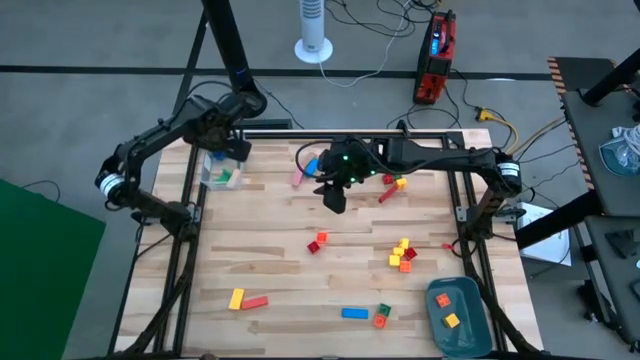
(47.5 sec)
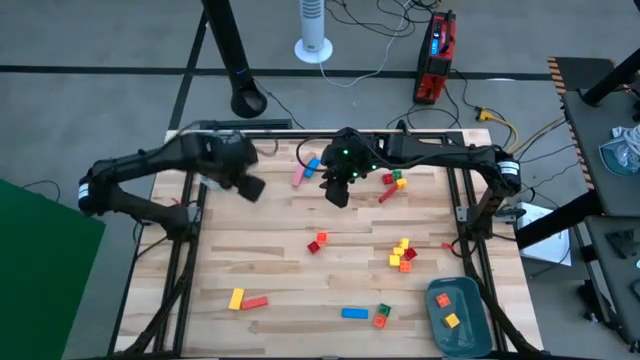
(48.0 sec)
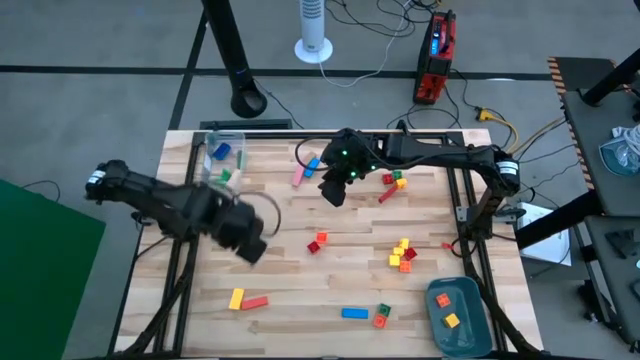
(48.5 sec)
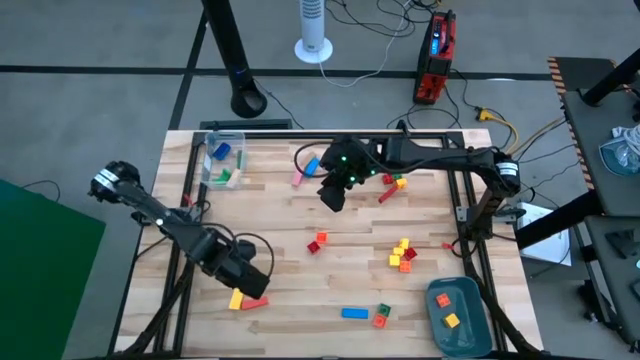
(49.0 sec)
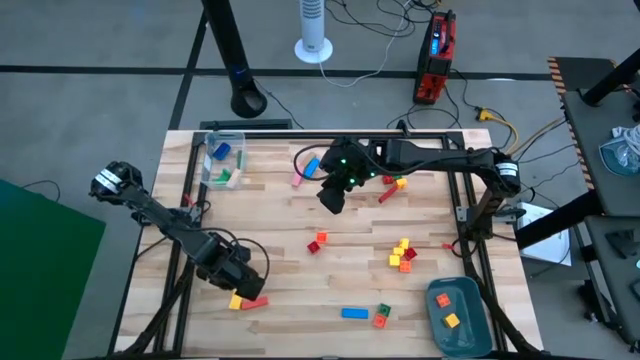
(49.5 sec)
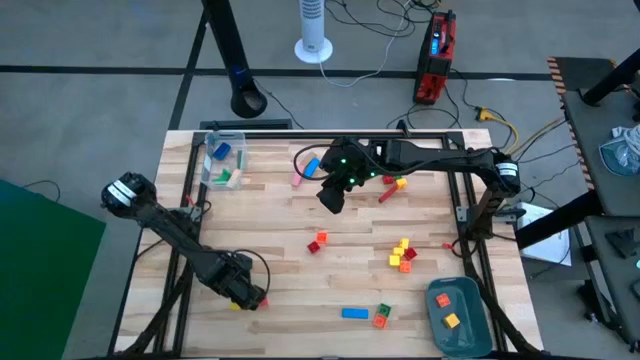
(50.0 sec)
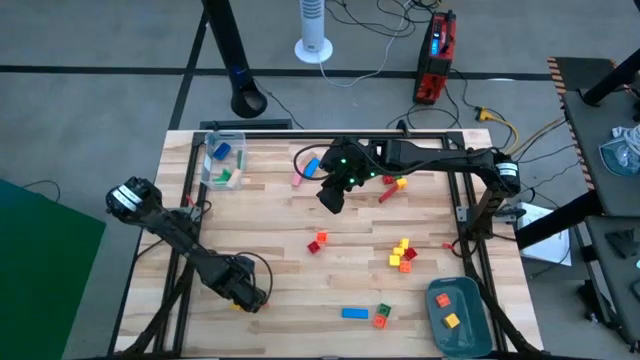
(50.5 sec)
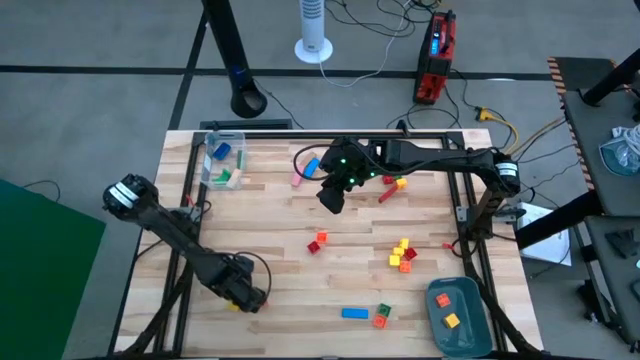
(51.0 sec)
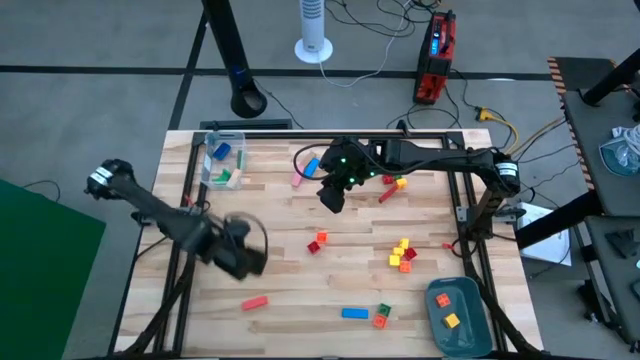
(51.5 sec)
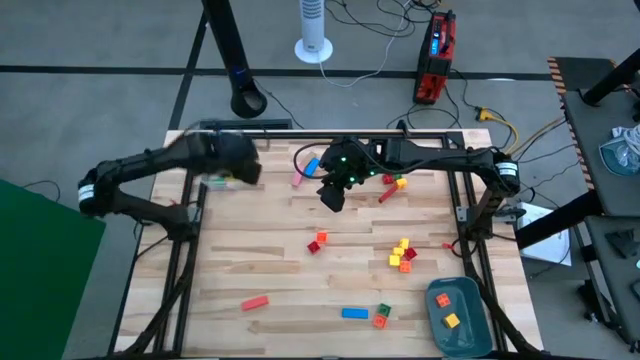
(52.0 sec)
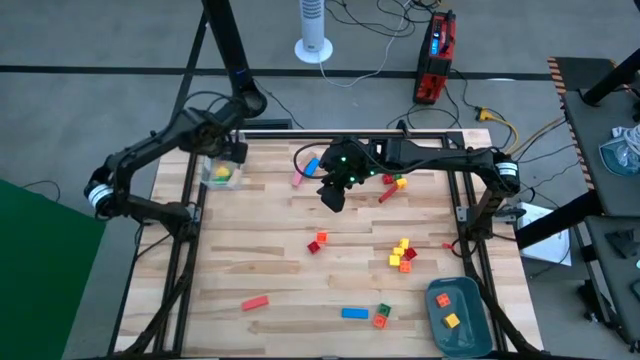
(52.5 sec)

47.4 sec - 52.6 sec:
Task: Sort blocks by size
Put the yellow rectangular wooden block into the transparent bin

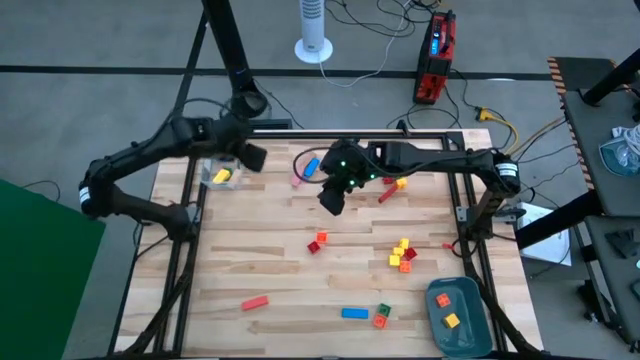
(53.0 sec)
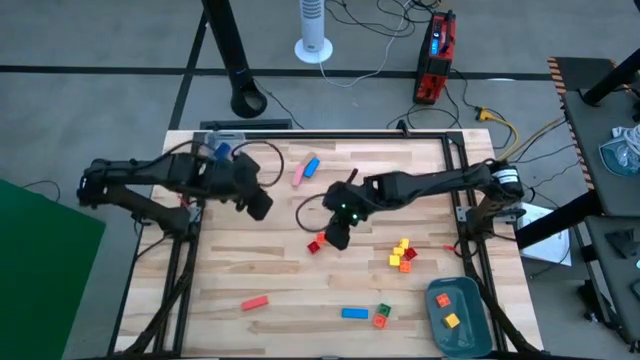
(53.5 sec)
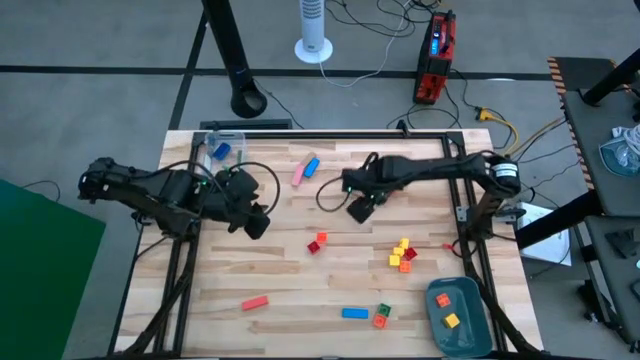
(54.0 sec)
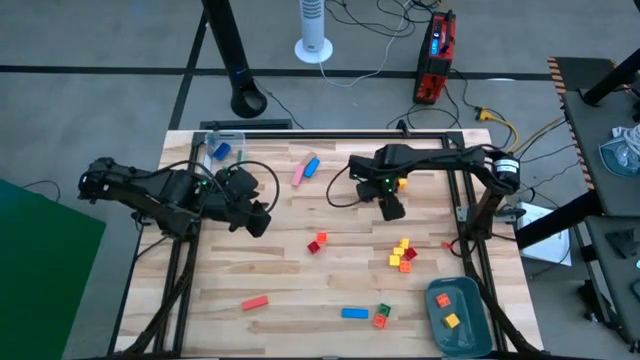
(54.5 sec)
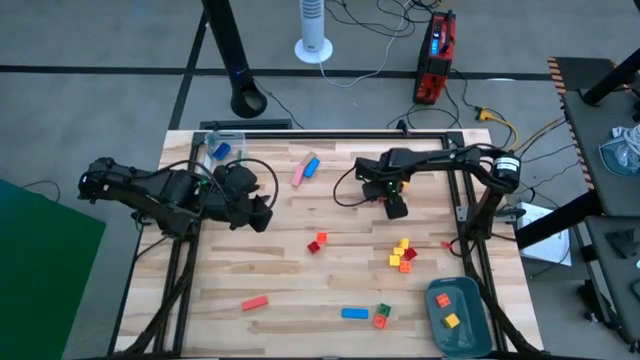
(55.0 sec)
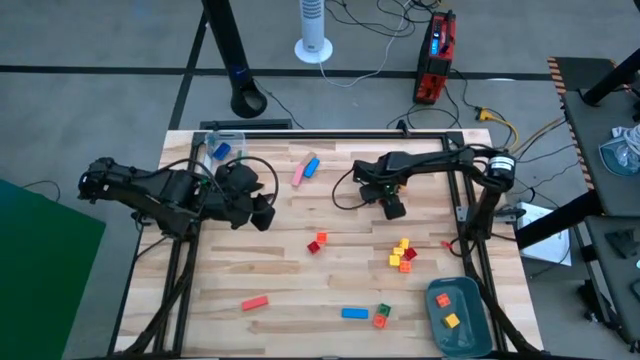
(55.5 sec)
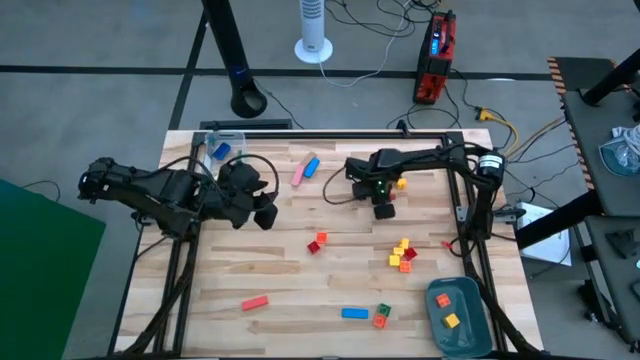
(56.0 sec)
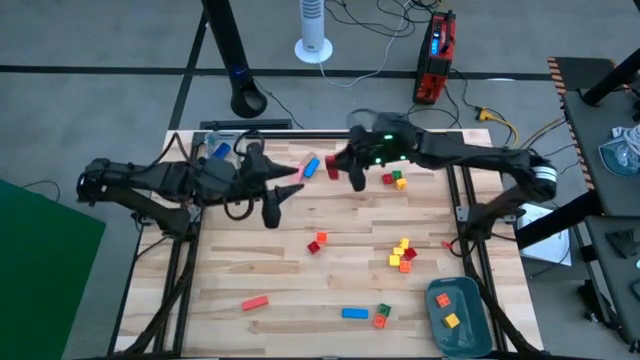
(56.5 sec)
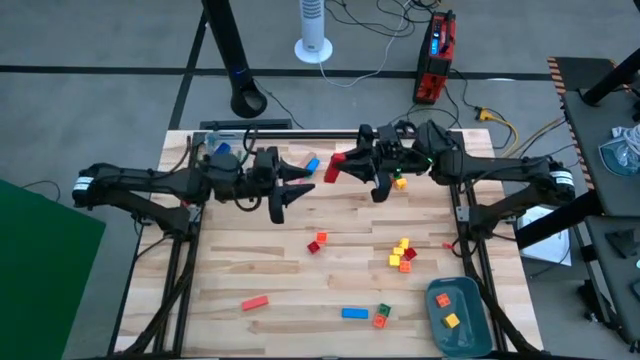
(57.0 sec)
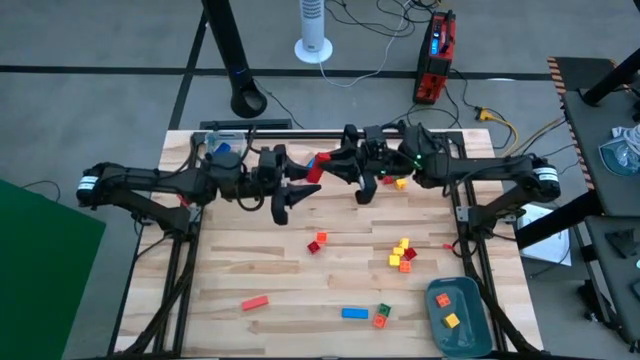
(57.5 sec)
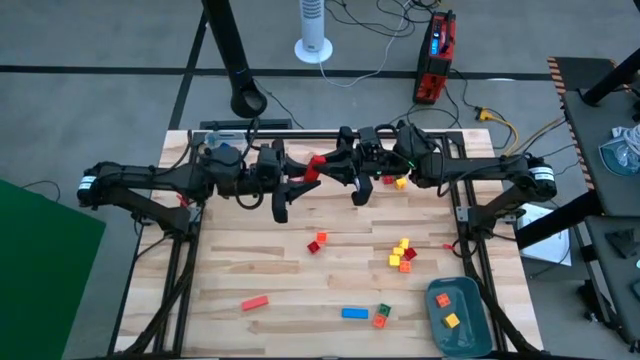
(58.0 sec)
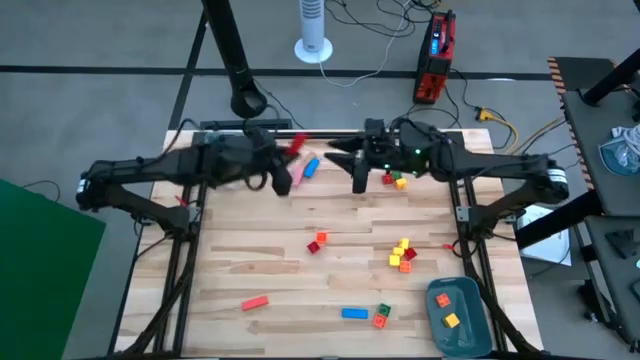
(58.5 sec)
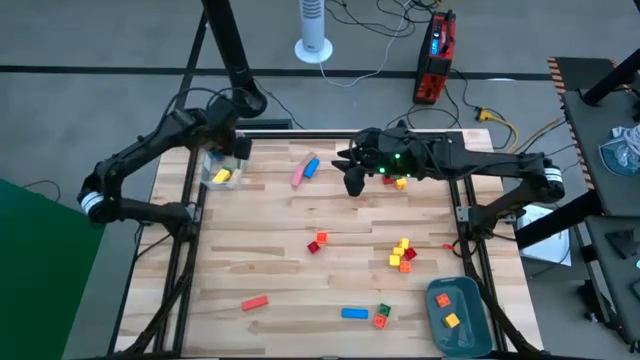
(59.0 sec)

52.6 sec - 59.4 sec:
Put the red rectangular wooden block into the transparent bin

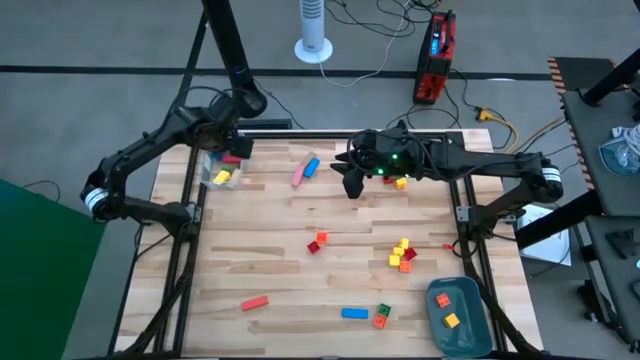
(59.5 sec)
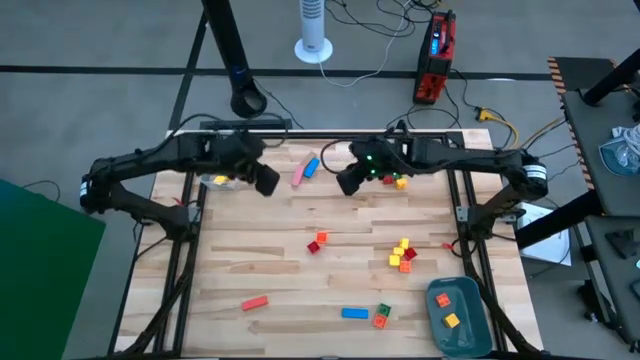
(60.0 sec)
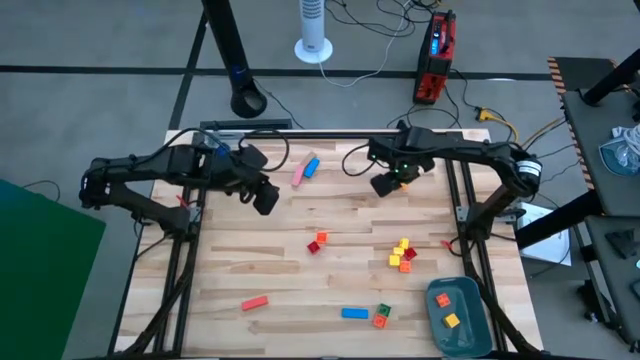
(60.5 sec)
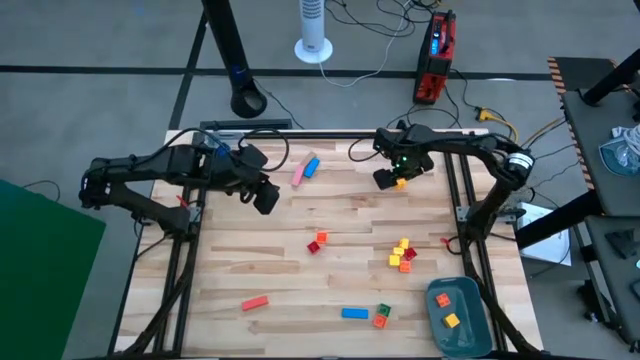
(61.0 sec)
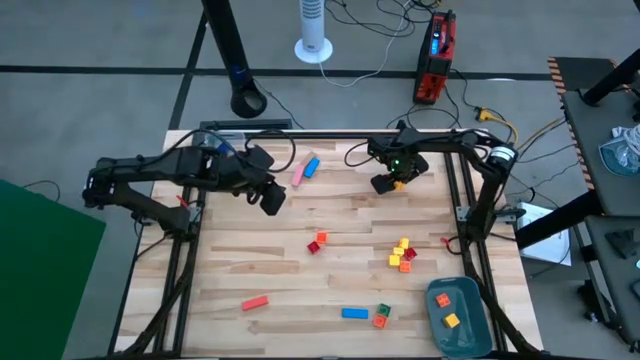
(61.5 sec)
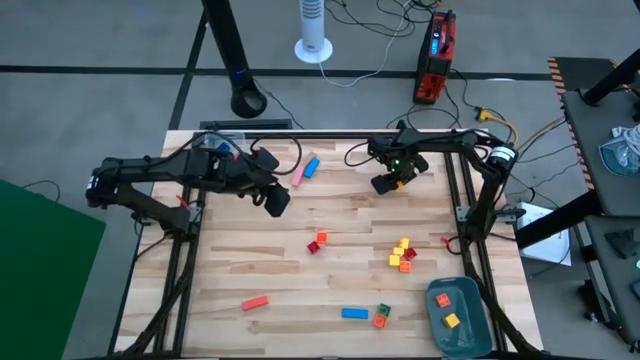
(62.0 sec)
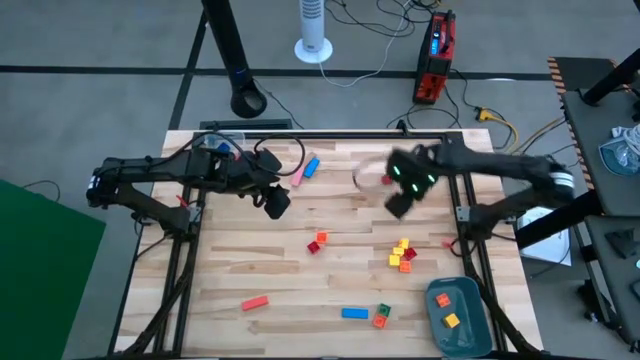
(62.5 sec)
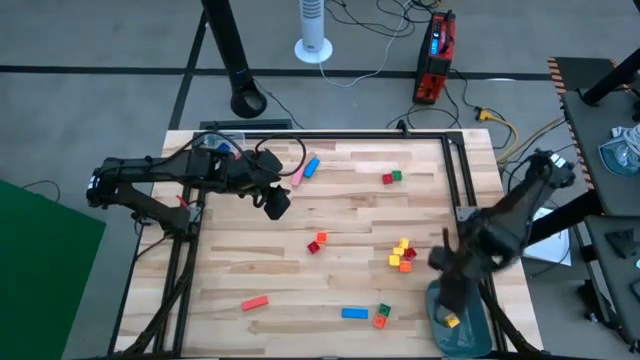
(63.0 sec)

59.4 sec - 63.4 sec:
Put the yellow square game piece into the blue bin

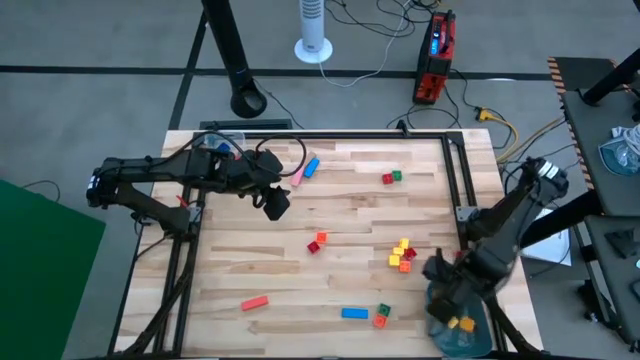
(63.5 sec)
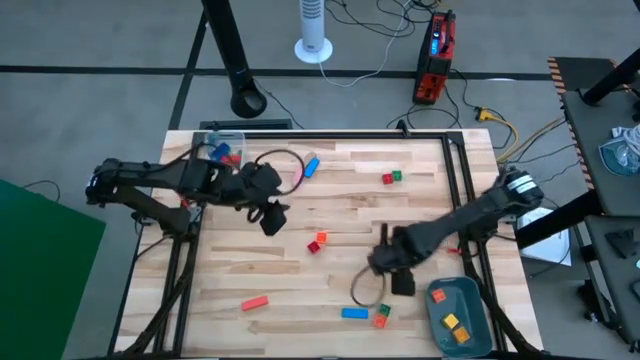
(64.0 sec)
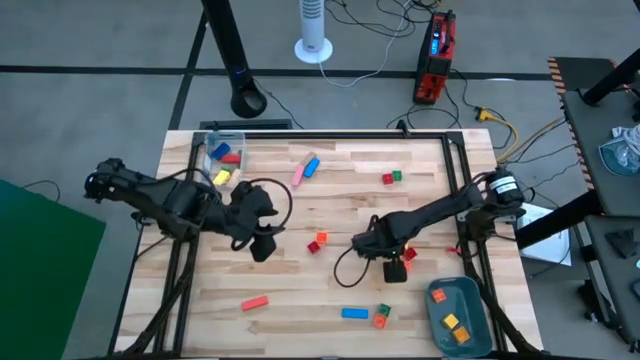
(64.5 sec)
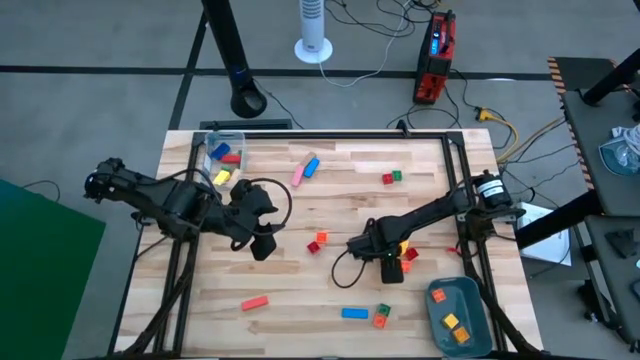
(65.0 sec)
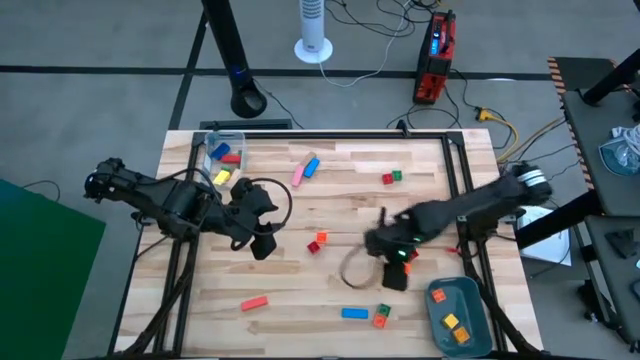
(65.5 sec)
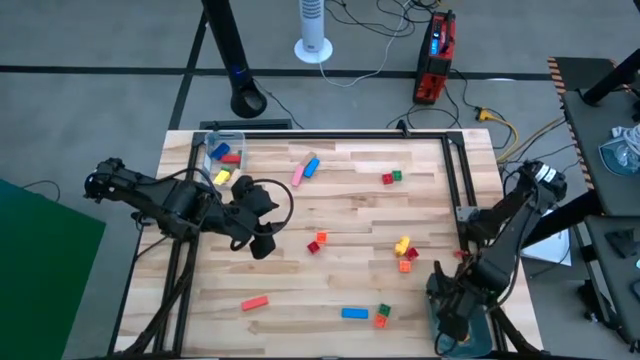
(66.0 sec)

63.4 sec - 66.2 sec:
Put the yellow square wooden block into the blue bin

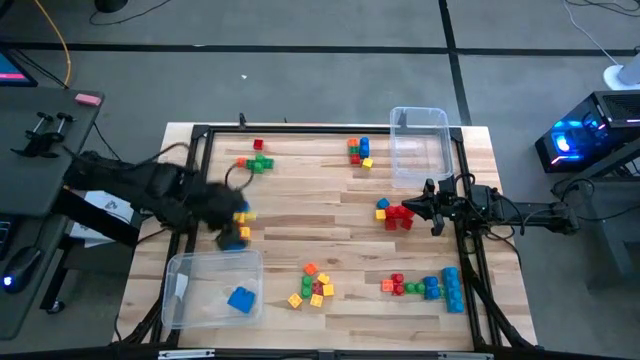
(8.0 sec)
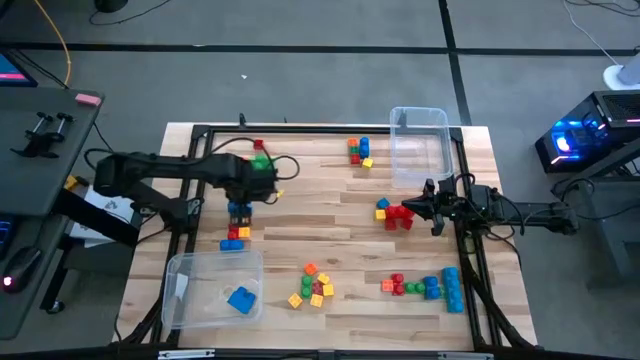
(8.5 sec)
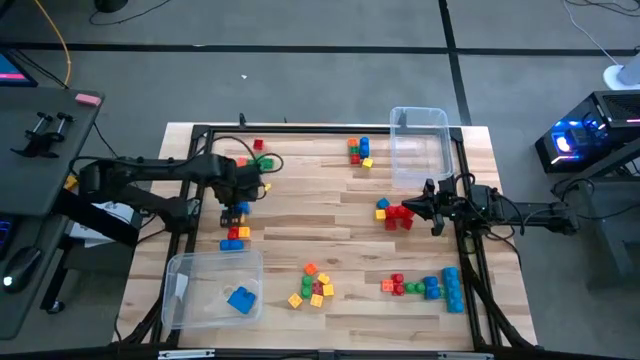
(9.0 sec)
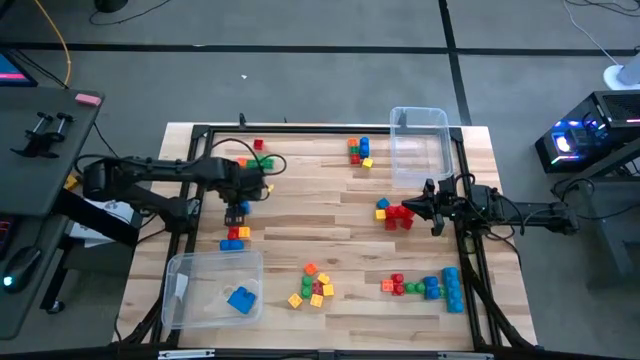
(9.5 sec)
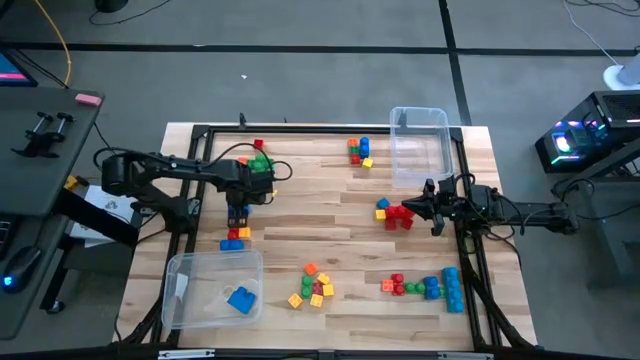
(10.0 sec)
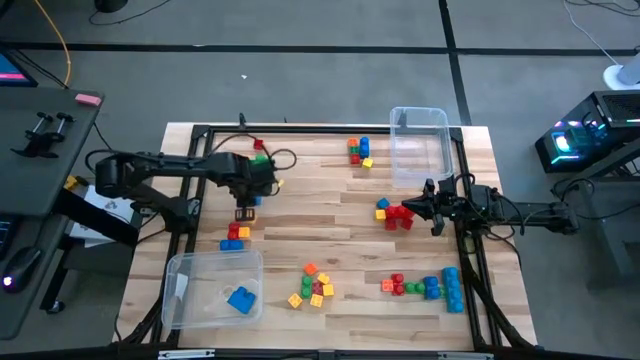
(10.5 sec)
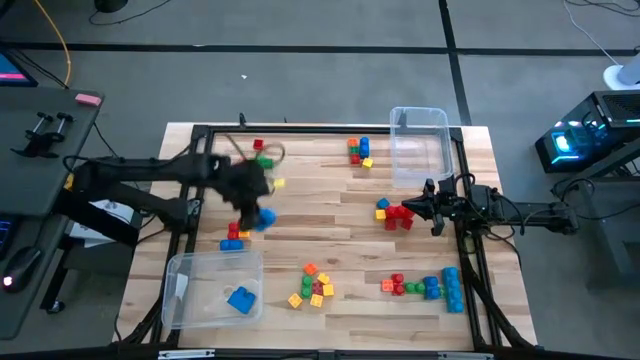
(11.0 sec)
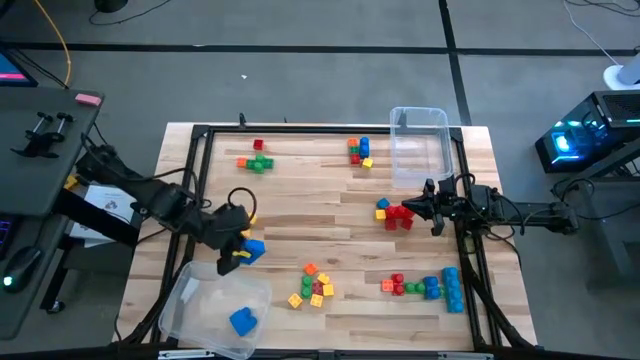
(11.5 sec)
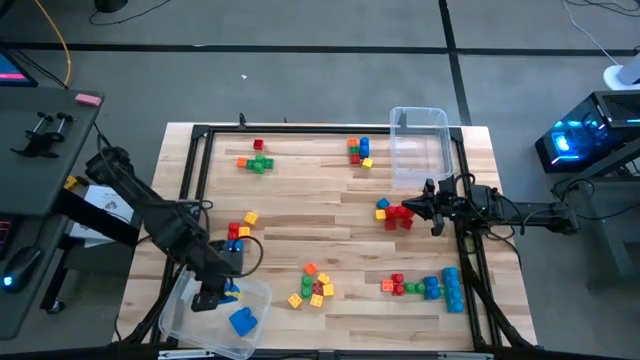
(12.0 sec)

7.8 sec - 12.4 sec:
Task: Sort blocks by size
Put the large blue game piece into the left transparent bin
